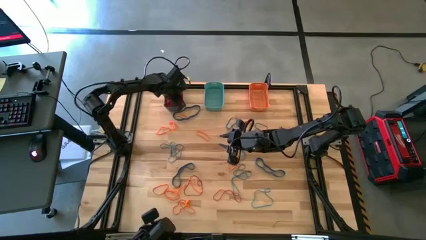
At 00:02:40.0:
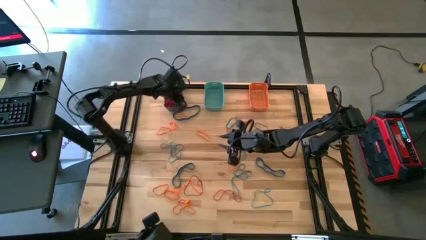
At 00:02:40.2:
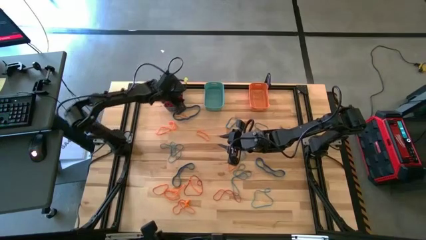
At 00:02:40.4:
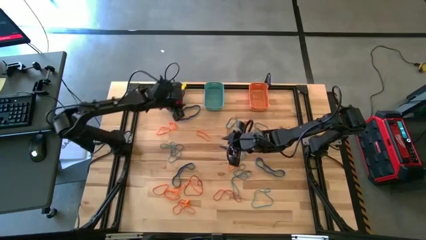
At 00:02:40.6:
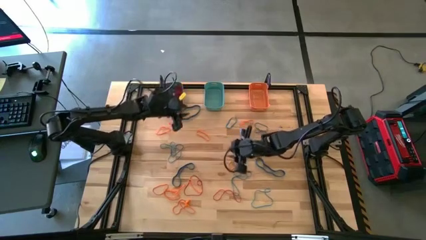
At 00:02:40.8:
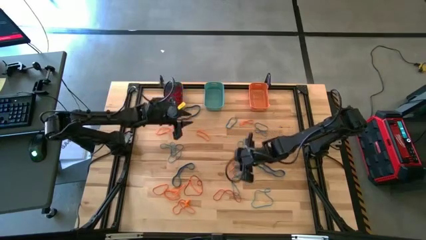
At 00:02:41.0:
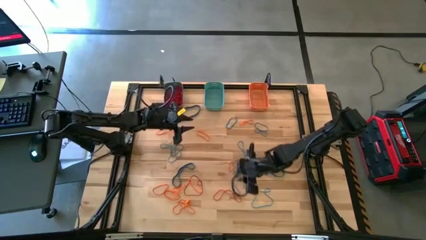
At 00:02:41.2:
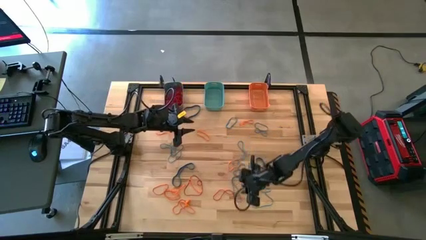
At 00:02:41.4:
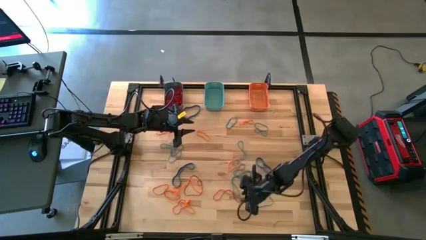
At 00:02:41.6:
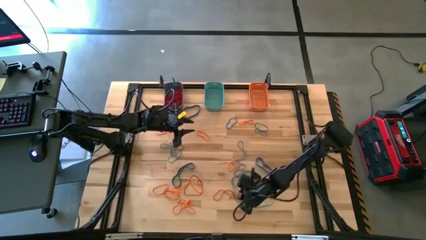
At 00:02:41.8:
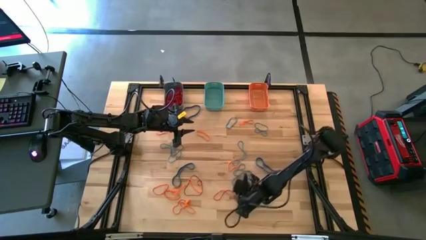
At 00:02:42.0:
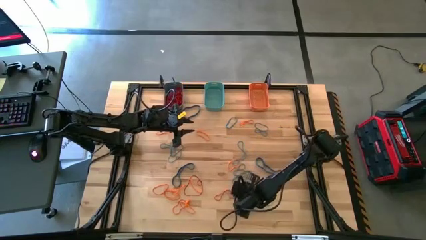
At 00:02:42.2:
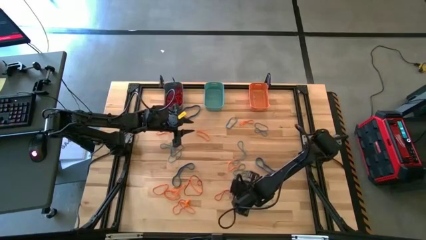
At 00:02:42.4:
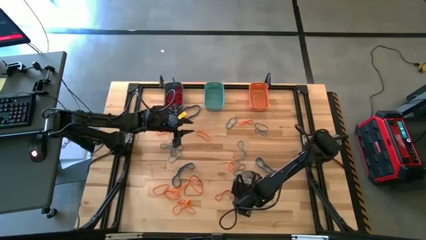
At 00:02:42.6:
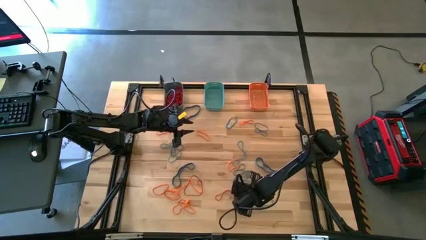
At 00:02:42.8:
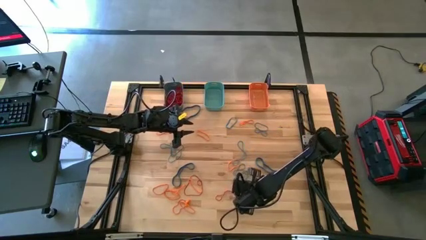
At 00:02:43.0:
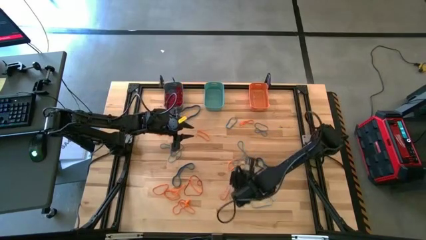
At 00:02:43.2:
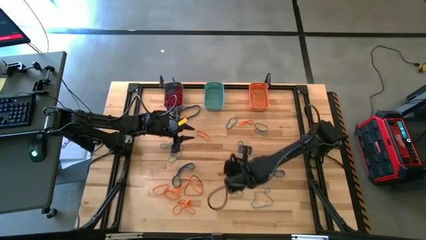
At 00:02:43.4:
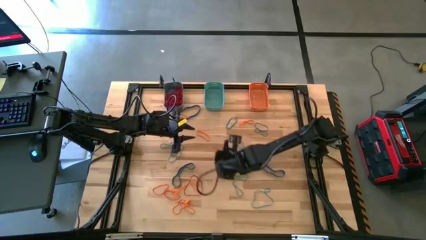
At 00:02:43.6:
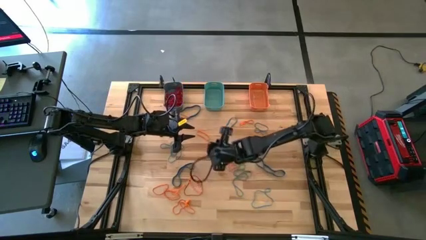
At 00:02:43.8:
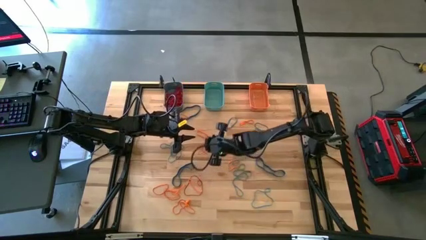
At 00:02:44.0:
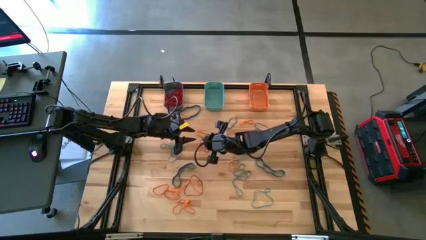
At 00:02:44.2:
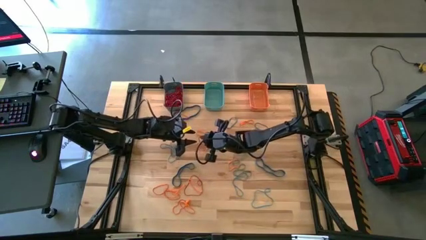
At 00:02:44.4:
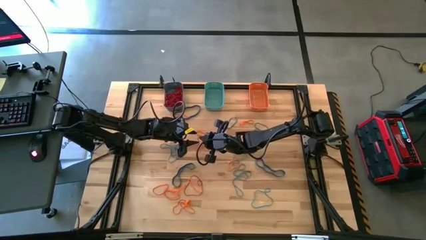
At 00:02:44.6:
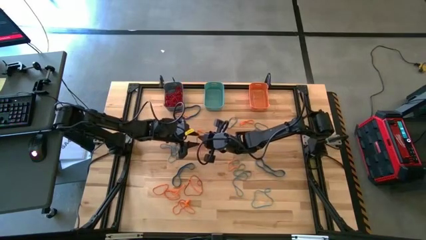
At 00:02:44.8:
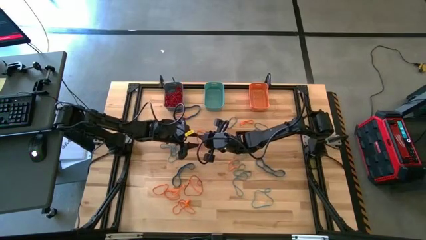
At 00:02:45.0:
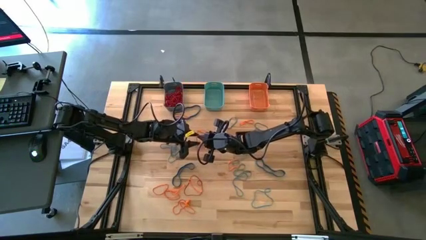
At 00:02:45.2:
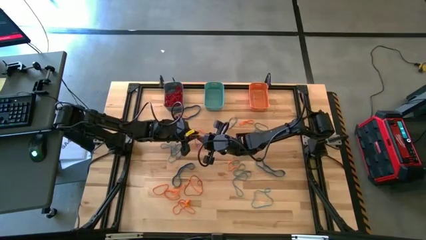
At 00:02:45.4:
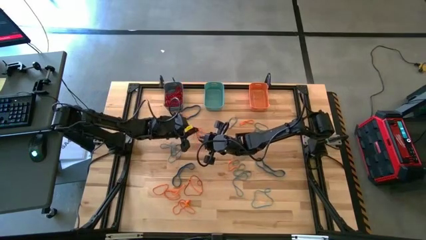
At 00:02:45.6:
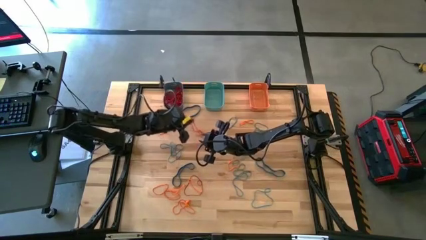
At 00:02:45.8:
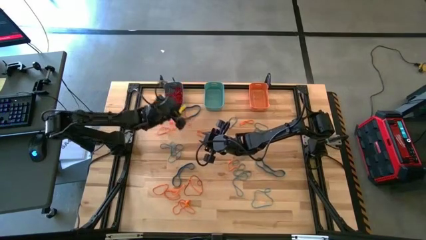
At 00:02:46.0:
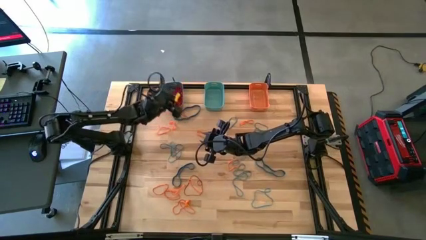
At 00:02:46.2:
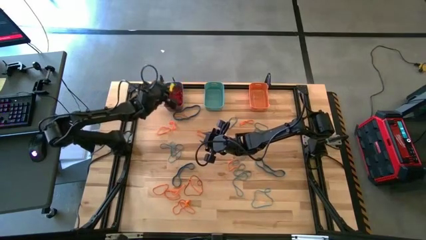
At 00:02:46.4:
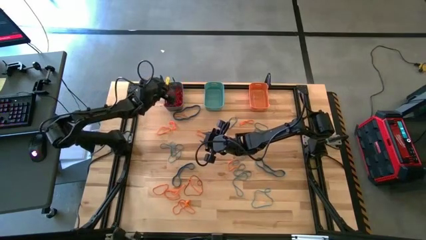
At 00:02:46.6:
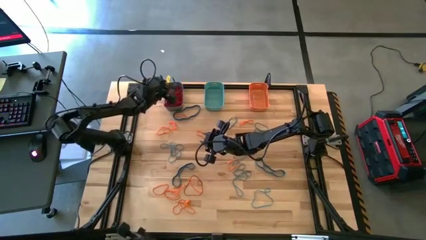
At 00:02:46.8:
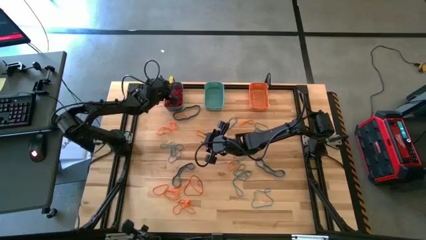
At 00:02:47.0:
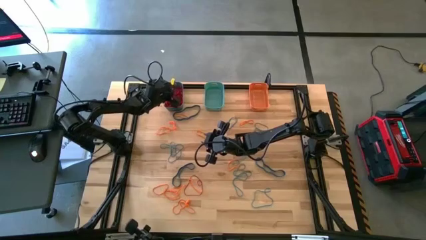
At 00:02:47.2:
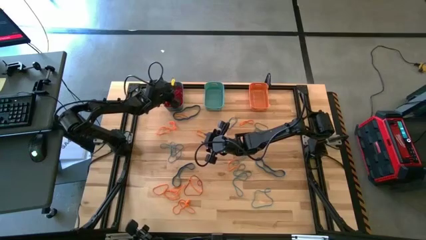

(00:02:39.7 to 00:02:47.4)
Task: Sort rubber bands into baskets
Put the red rubber band into the blue bin

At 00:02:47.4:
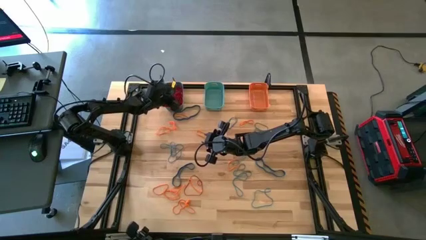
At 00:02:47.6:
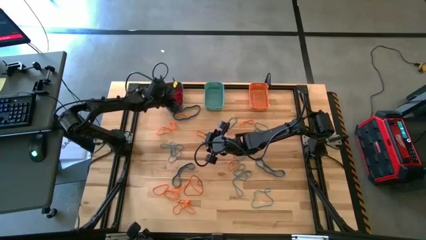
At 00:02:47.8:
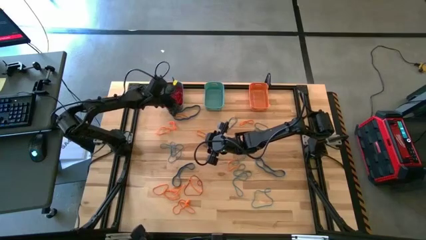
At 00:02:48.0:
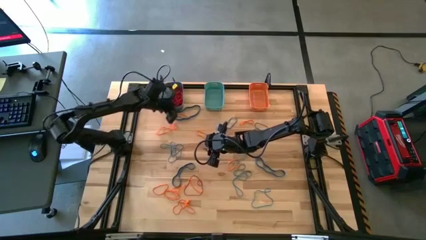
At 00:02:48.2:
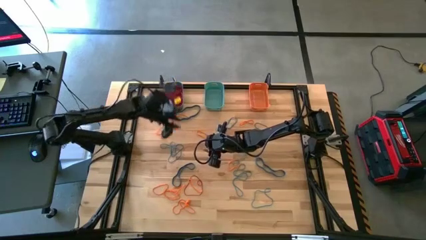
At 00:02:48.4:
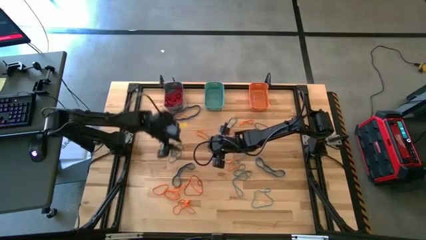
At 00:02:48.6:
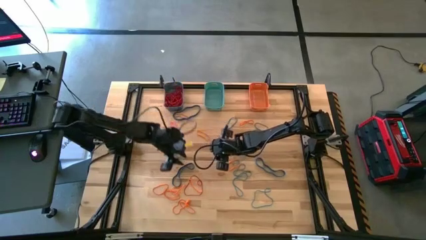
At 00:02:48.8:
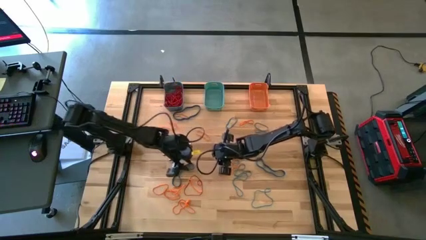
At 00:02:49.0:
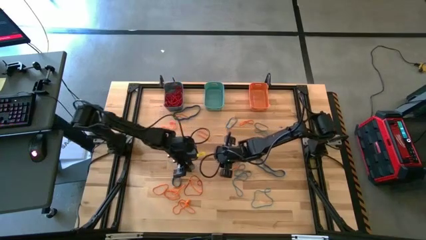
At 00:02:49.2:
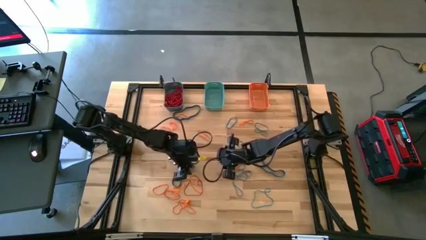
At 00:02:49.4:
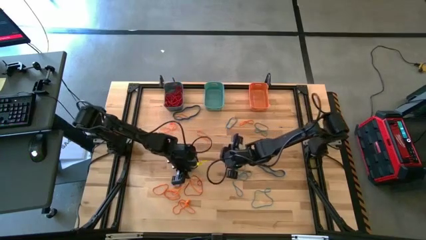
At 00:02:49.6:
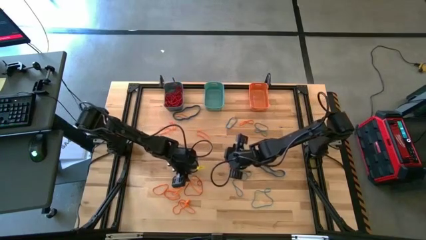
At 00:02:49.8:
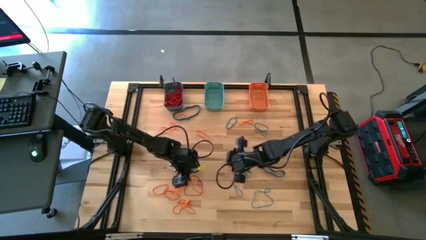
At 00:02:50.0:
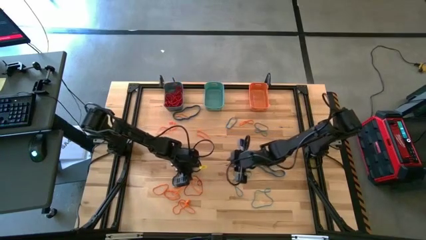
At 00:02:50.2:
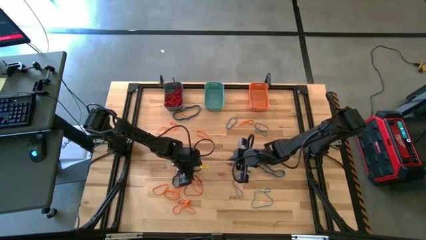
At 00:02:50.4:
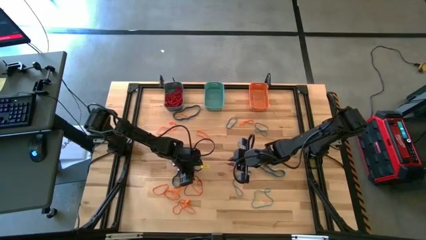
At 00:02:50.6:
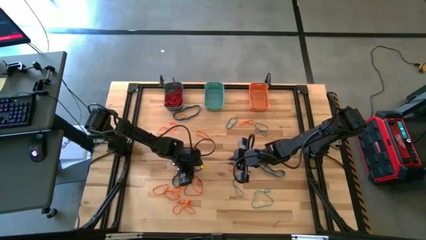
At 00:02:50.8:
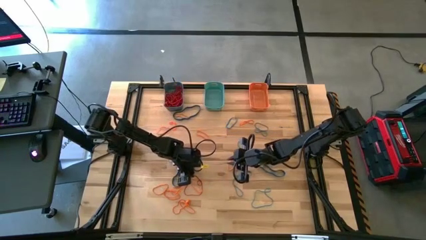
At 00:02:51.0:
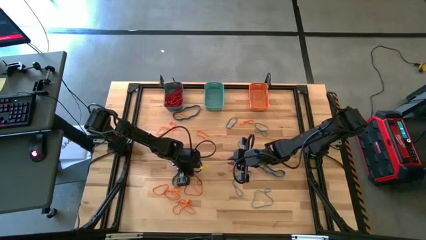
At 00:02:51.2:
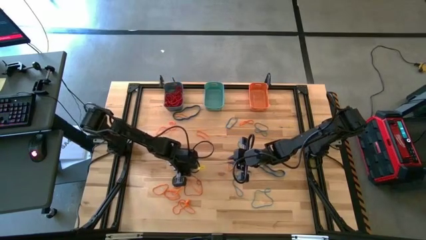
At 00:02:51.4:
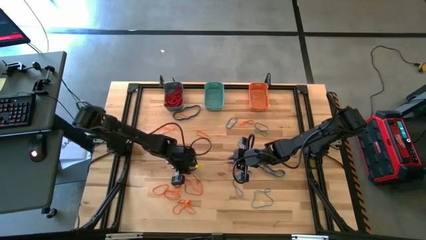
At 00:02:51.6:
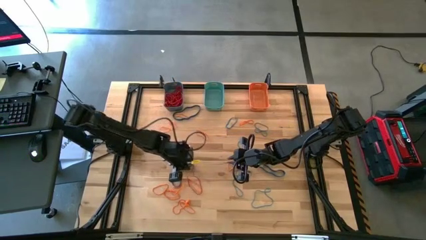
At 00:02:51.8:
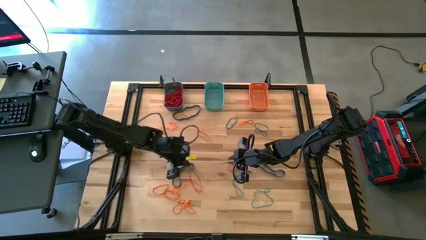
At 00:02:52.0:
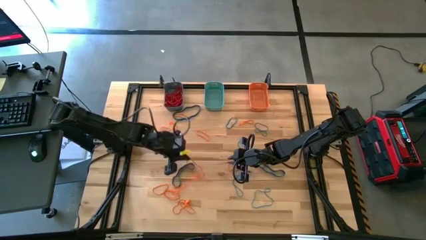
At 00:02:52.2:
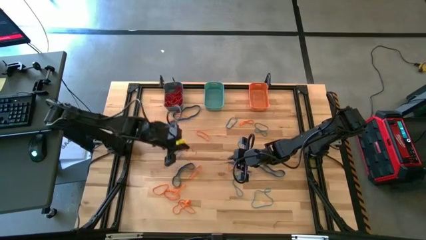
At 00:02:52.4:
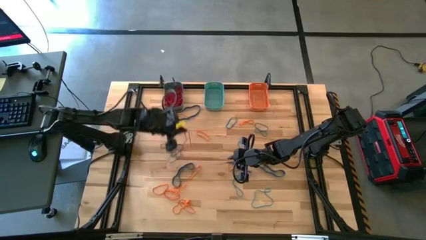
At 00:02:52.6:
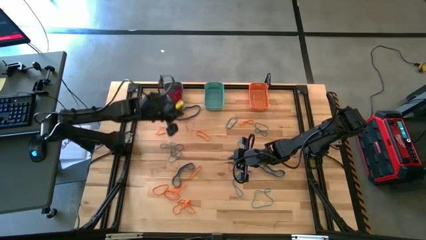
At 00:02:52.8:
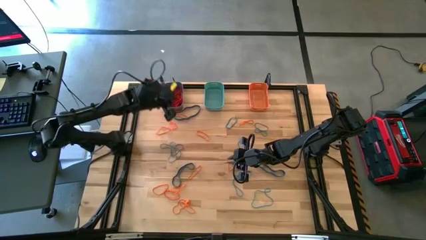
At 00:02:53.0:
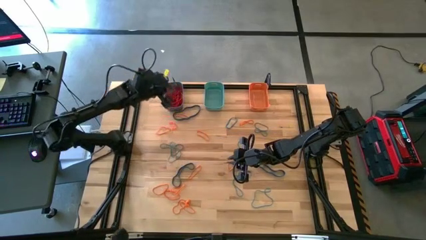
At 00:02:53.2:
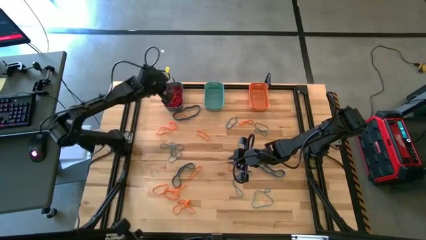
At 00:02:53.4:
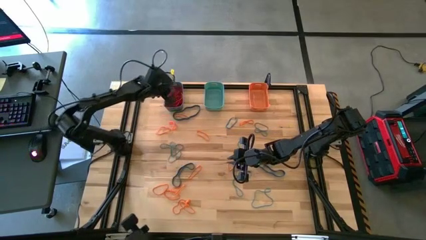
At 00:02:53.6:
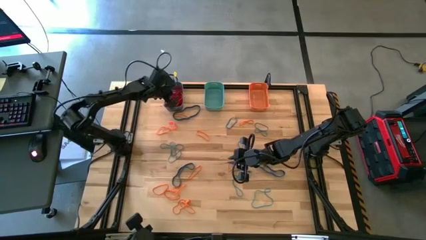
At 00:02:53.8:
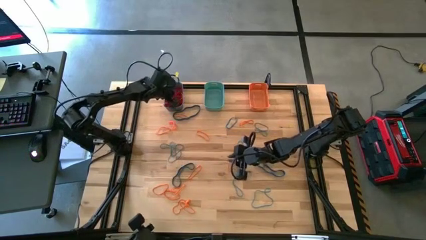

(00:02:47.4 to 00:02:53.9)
Put the red rubber band into the blue bin

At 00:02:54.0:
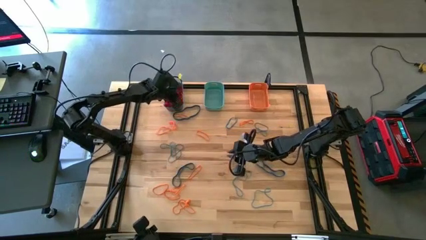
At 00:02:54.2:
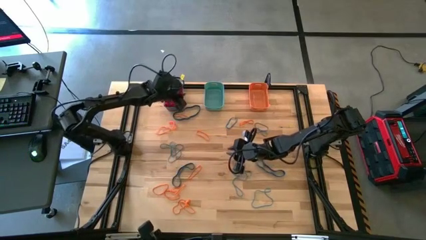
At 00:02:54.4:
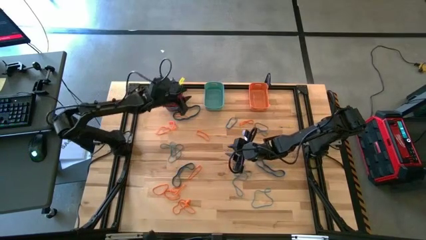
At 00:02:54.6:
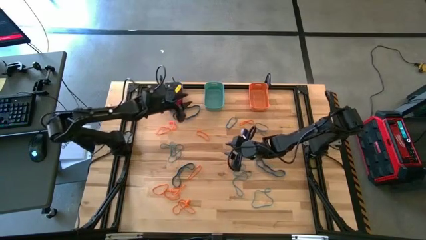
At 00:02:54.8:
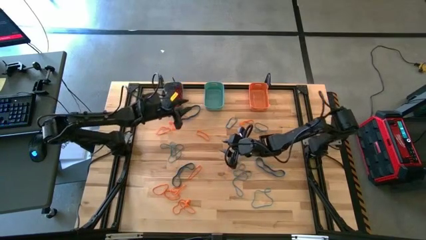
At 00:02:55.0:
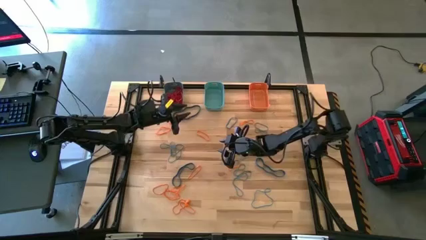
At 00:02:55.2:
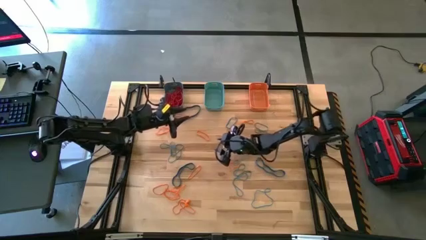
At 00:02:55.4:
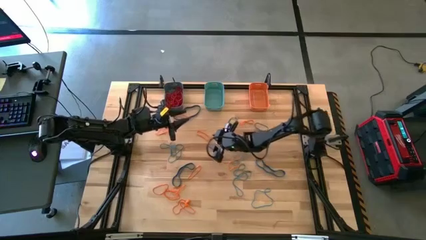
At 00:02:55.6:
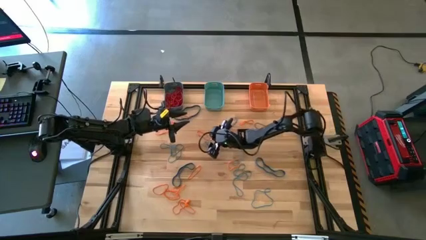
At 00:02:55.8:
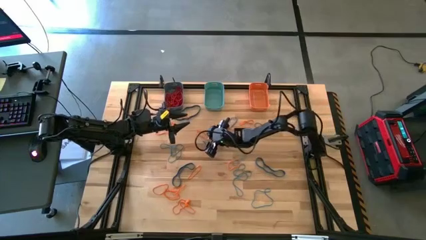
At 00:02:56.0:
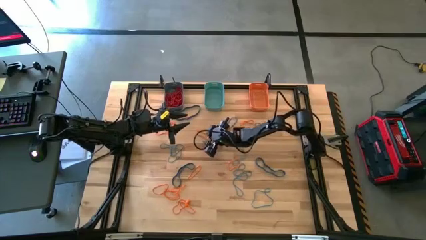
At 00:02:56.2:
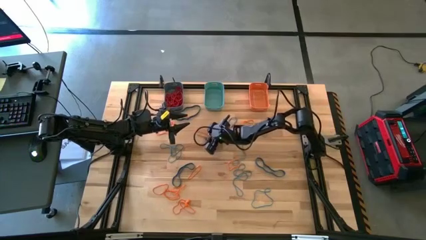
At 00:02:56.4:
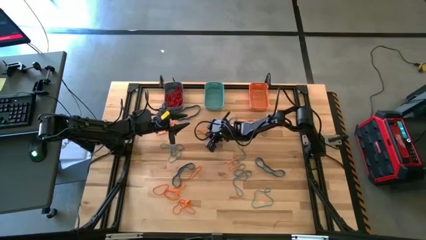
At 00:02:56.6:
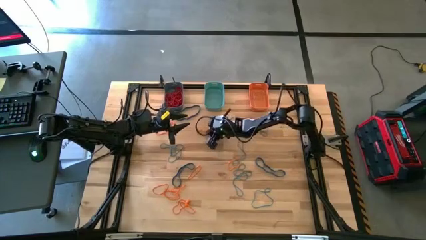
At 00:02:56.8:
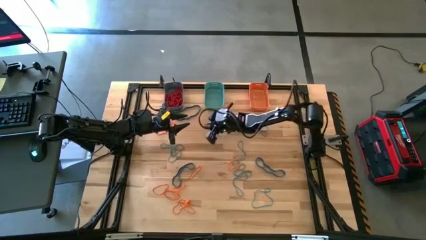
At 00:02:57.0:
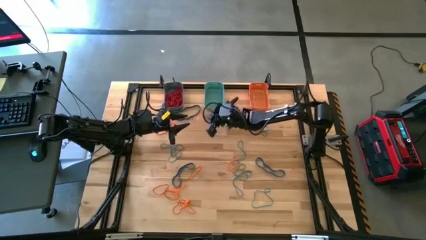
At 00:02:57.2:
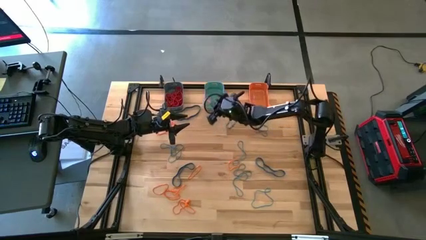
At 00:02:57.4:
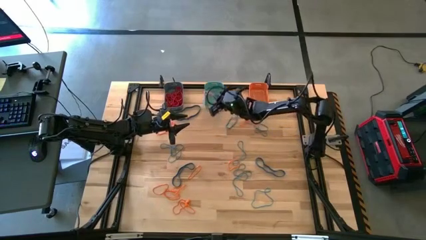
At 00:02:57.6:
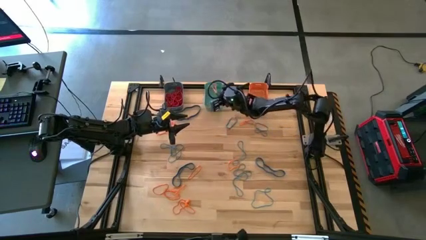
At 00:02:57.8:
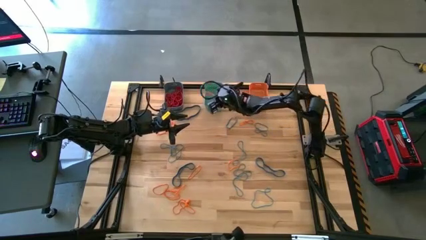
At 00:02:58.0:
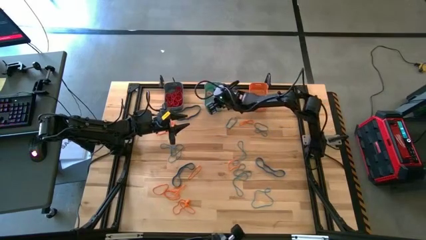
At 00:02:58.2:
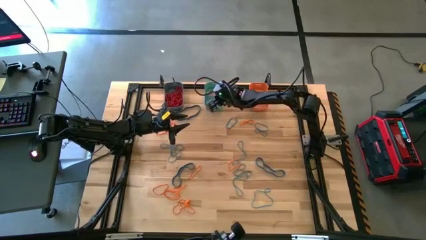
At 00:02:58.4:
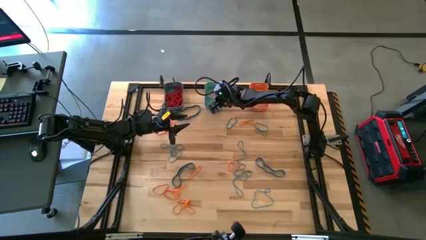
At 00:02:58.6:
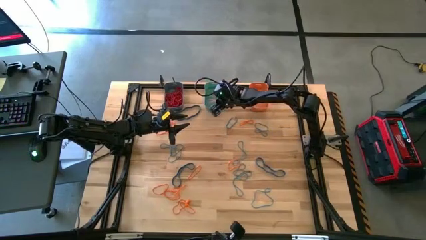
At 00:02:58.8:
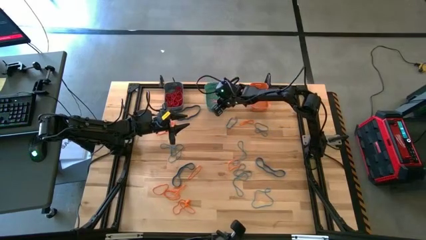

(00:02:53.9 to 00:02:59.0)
Put the orange rubber band into the green bin
